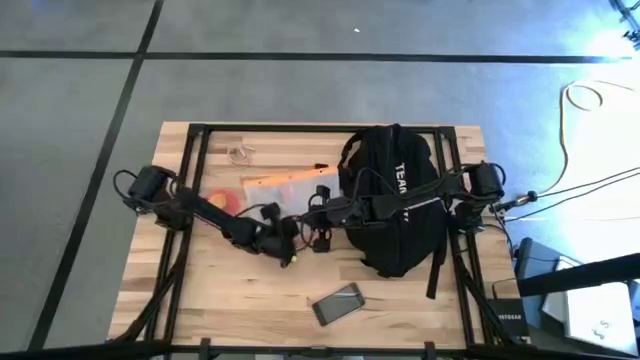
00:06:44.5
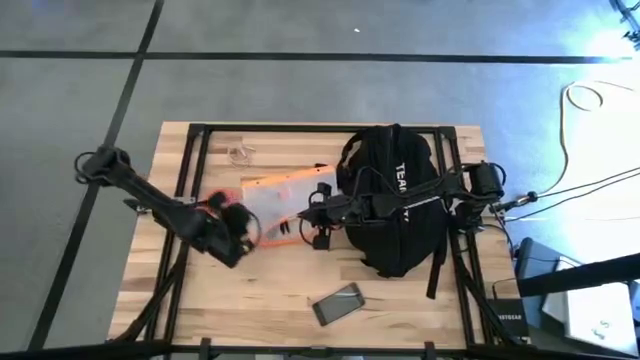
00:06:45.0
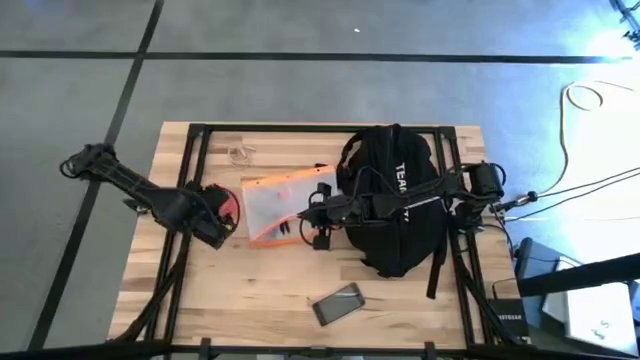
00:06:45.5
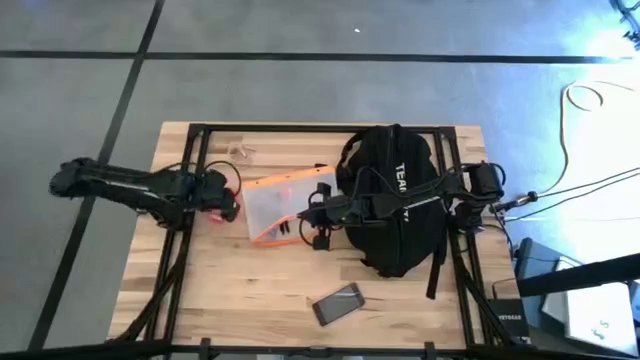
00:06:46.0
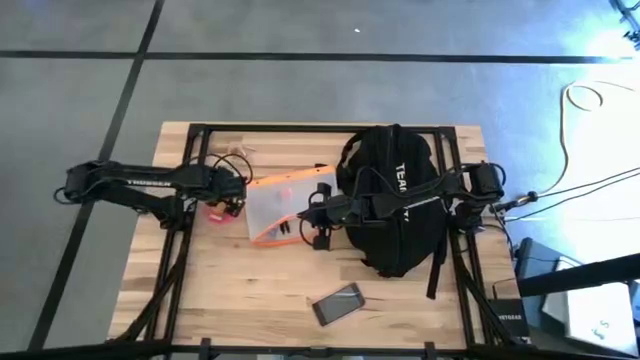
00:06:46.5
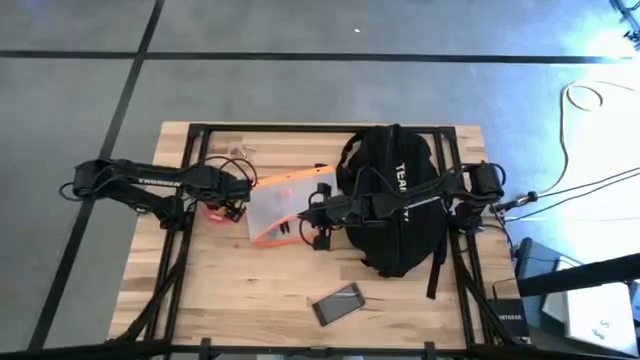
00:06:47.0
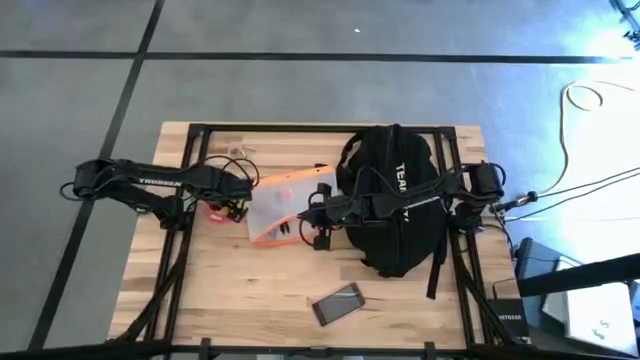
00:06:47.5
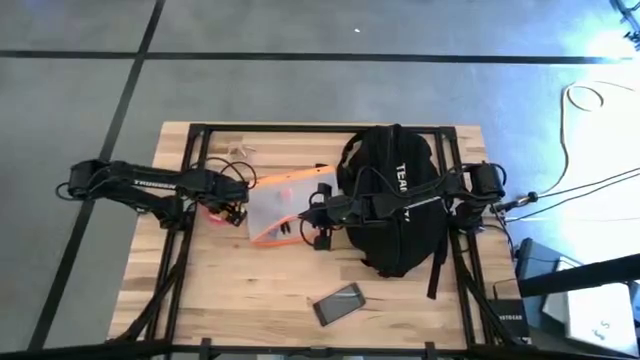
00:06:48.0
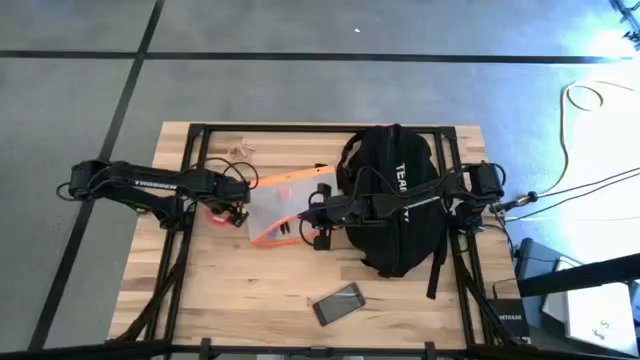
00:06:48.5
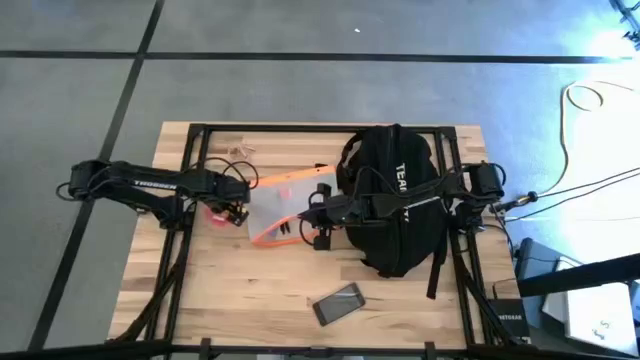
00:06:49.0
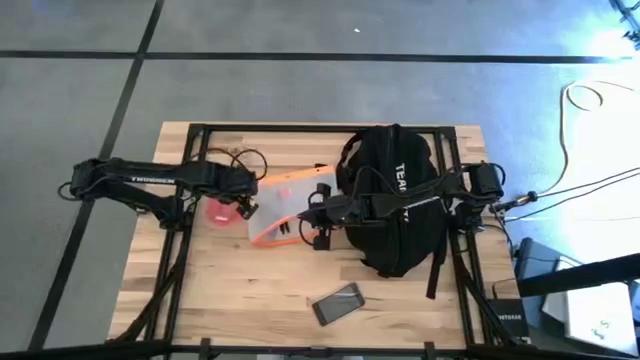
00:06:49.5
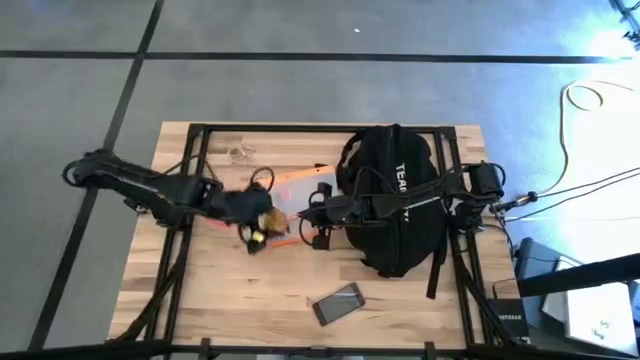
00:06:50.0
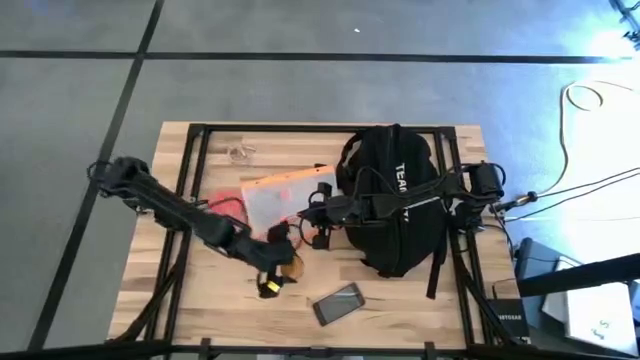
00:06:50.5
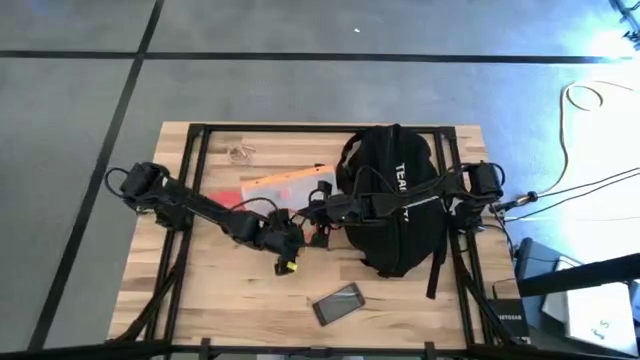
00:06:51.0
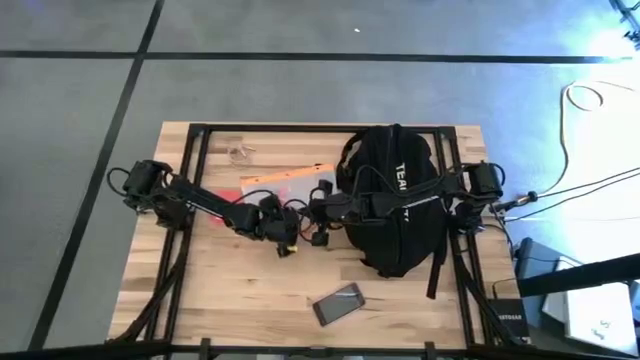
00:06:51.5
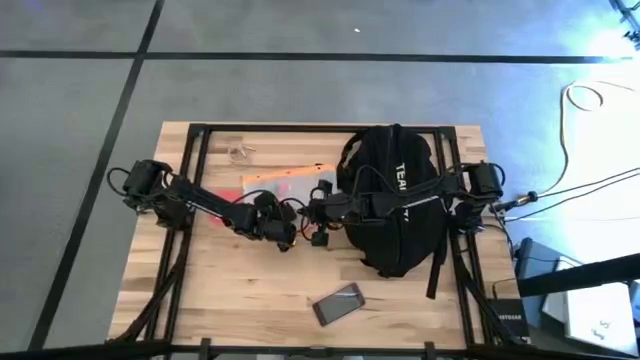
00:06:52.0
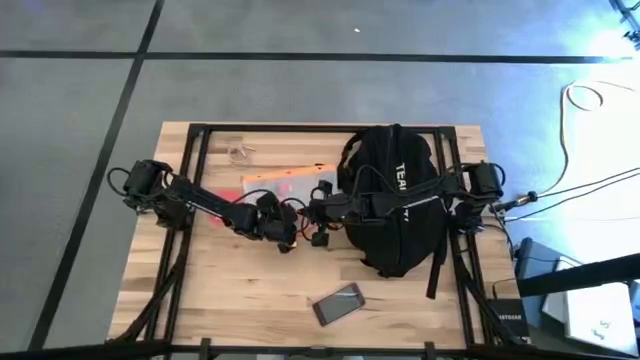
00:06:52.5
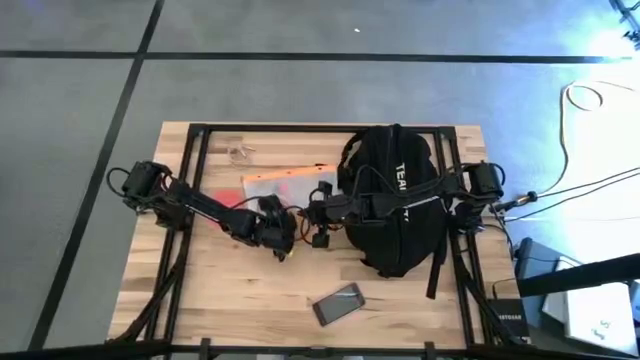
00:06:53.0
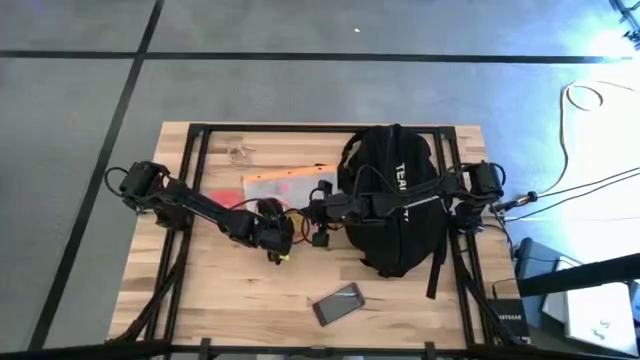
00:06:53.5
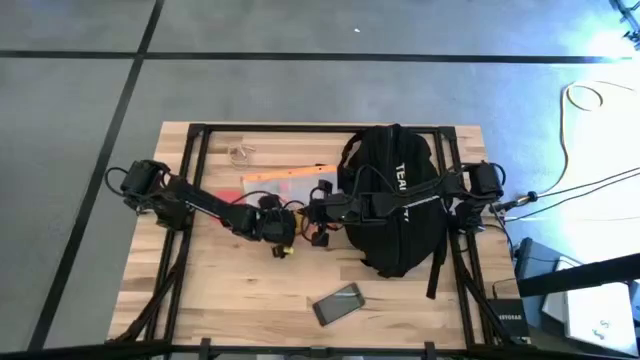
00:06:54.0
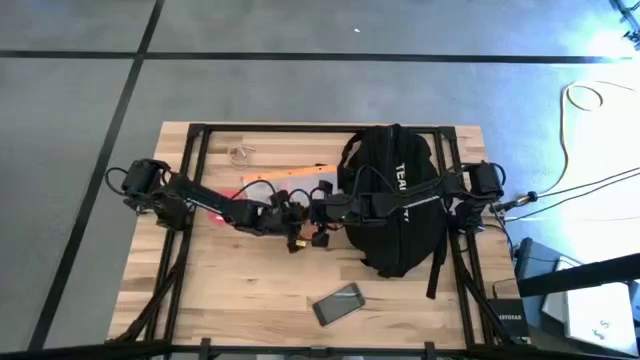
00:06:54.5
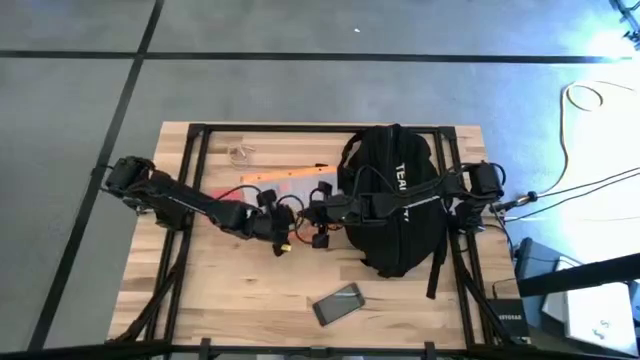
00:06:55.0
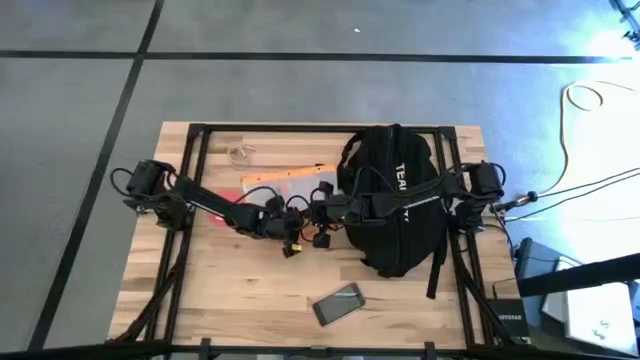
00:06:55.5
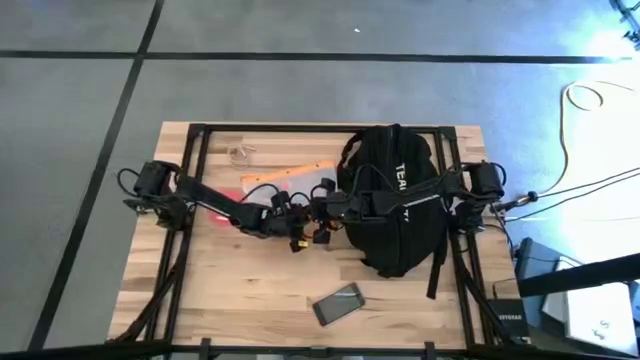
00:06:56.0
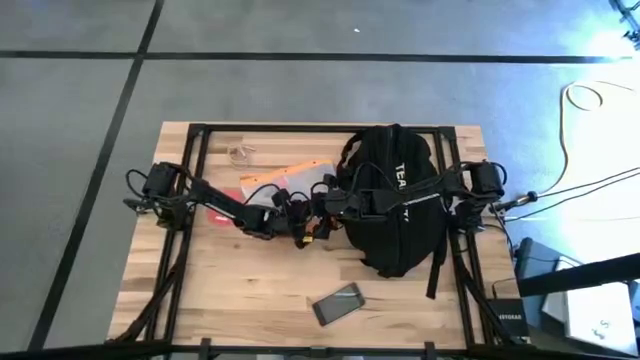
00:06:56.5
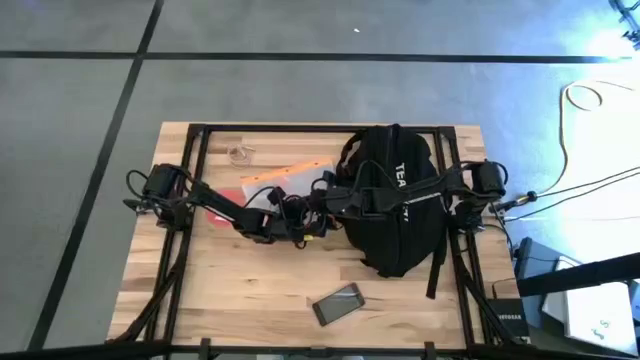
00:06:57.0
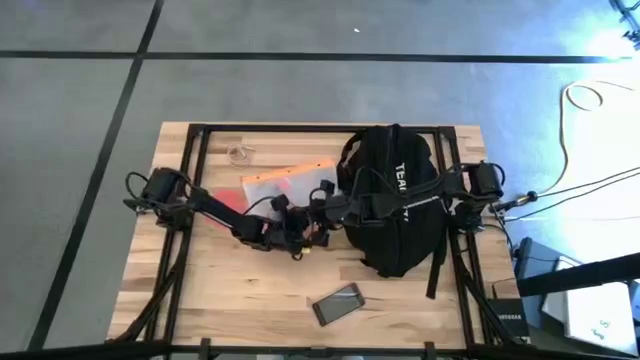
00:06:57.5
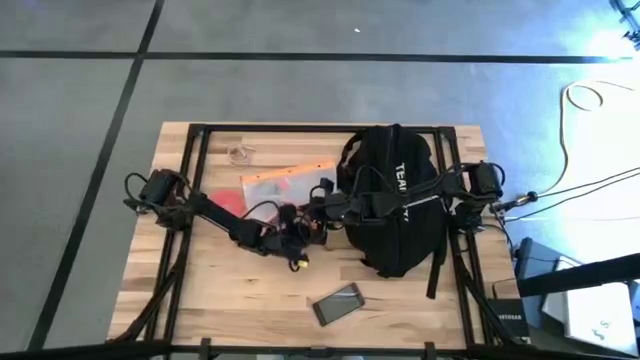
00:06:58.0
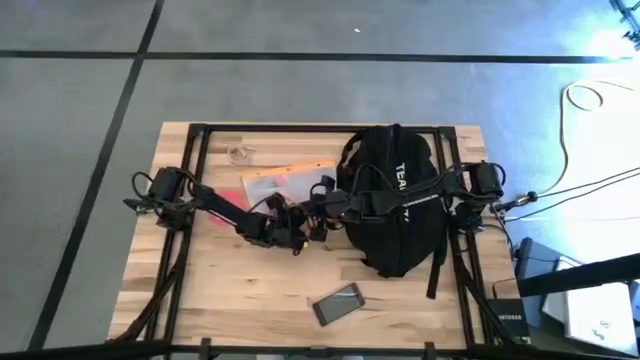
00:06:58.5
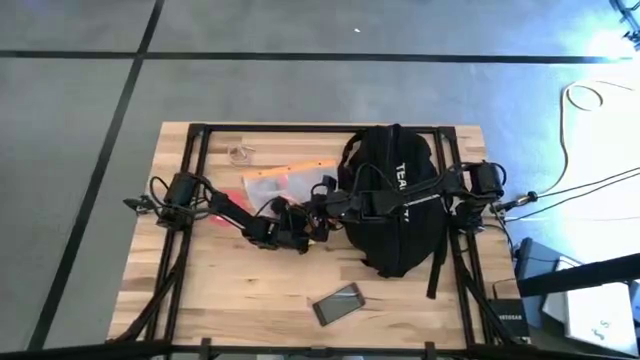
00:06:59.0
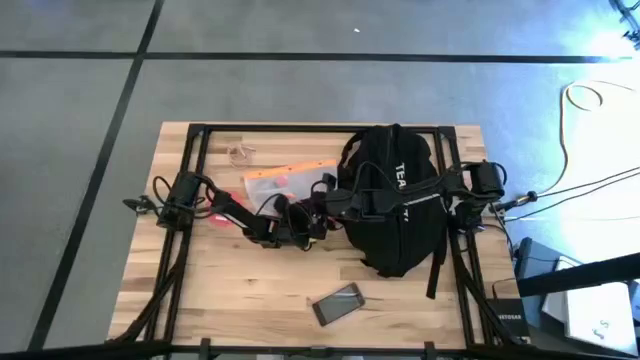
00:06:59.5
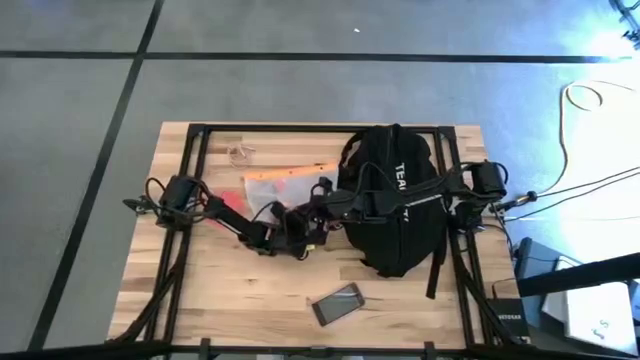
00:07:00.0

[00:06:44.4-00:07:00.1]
Task: Unpack backpack
Put the yellow scented candle into the transparent white zip bag

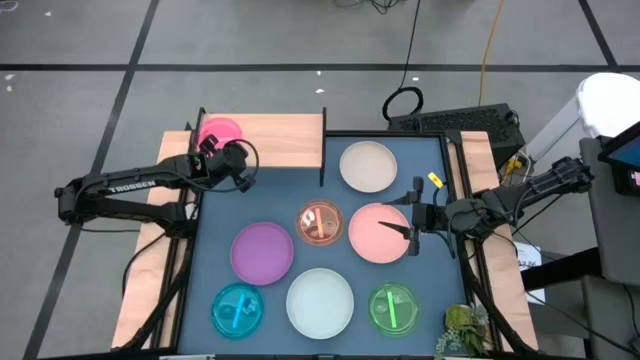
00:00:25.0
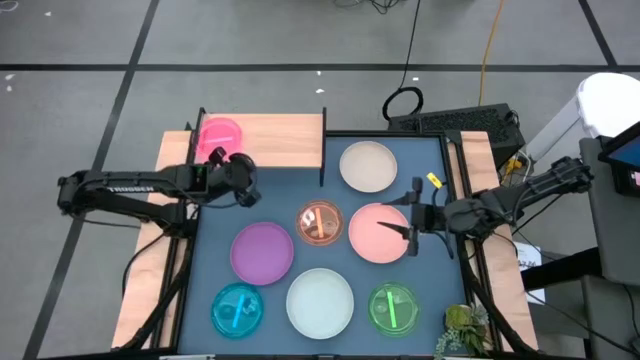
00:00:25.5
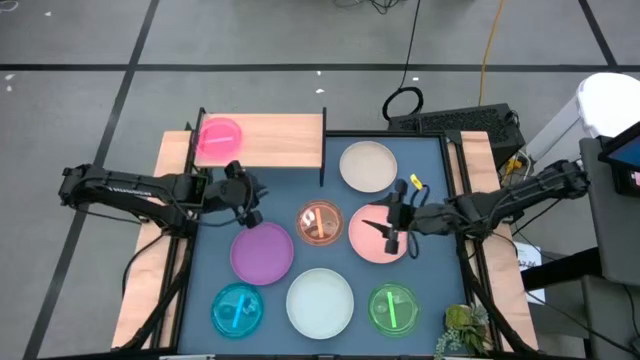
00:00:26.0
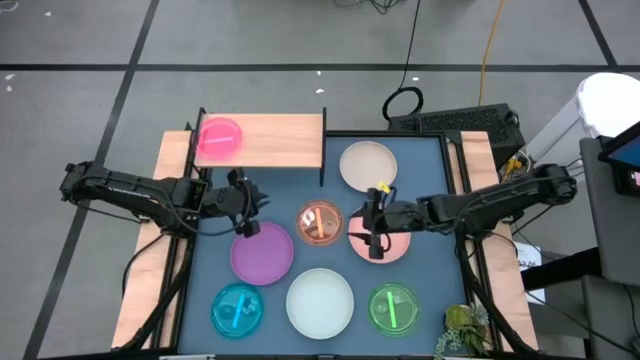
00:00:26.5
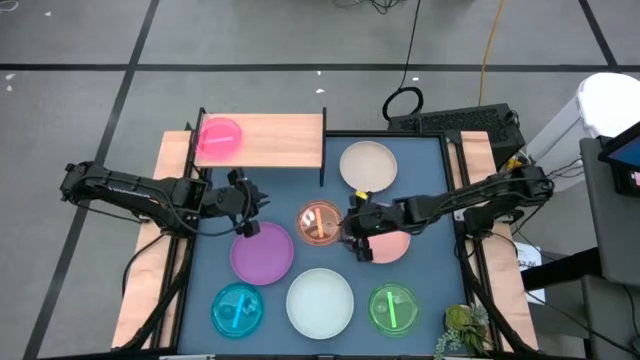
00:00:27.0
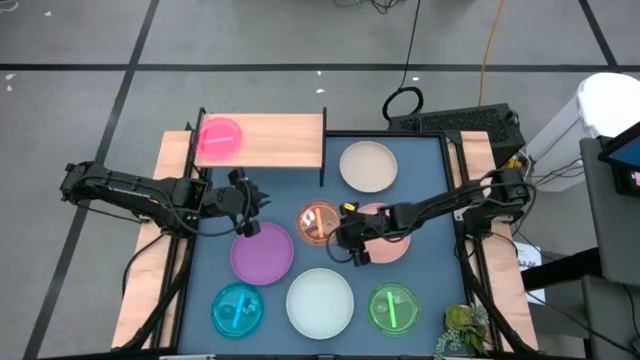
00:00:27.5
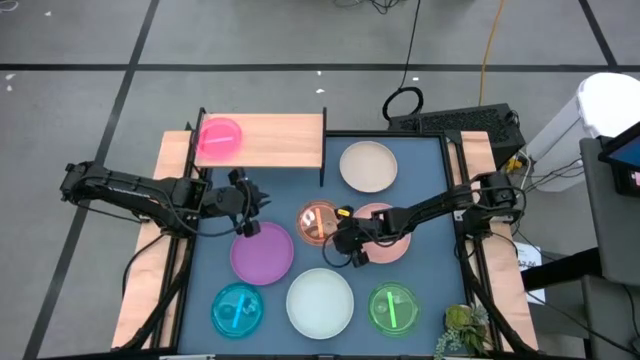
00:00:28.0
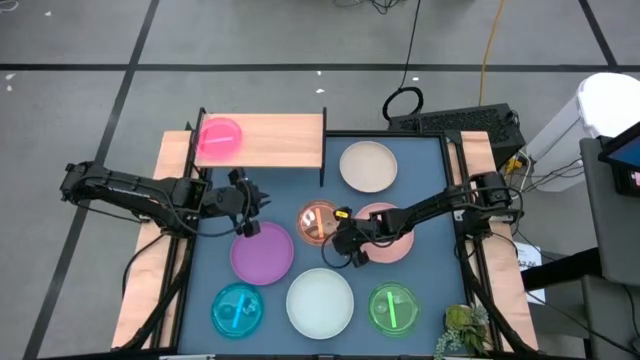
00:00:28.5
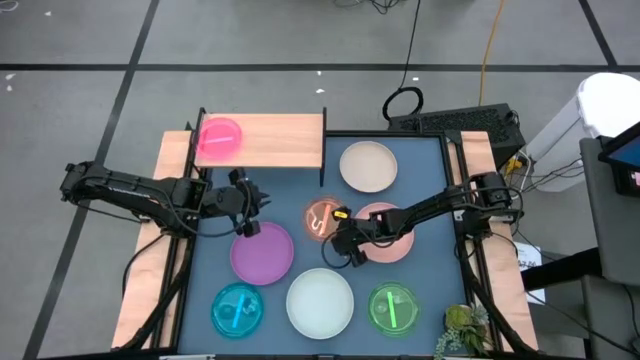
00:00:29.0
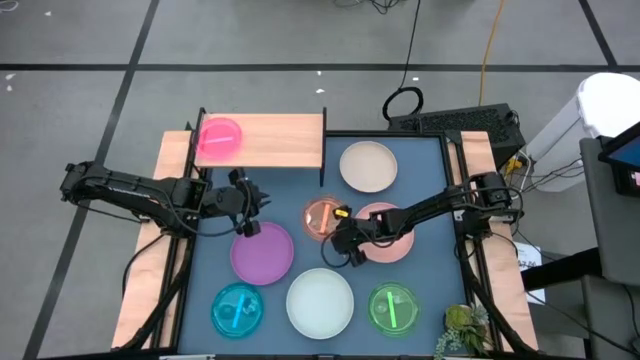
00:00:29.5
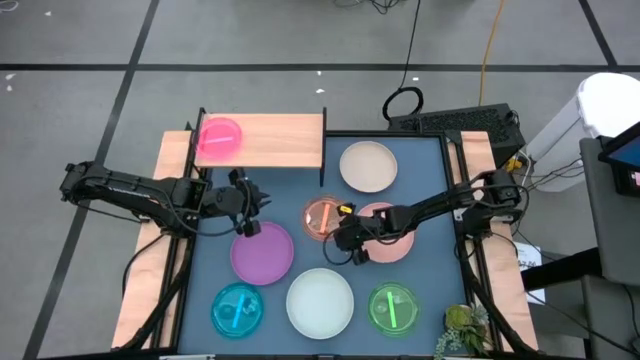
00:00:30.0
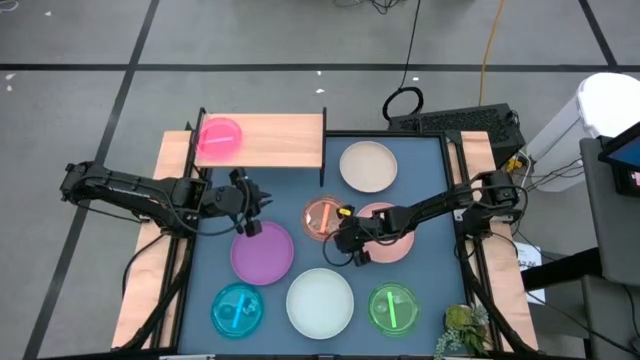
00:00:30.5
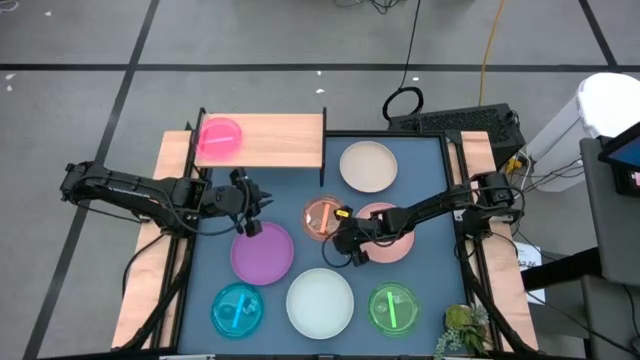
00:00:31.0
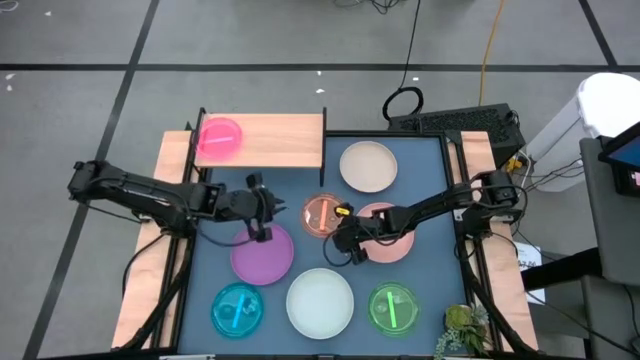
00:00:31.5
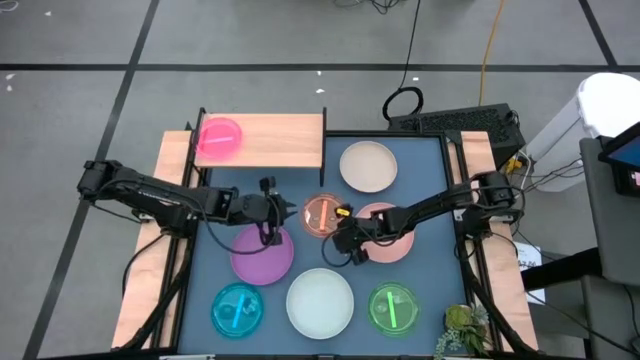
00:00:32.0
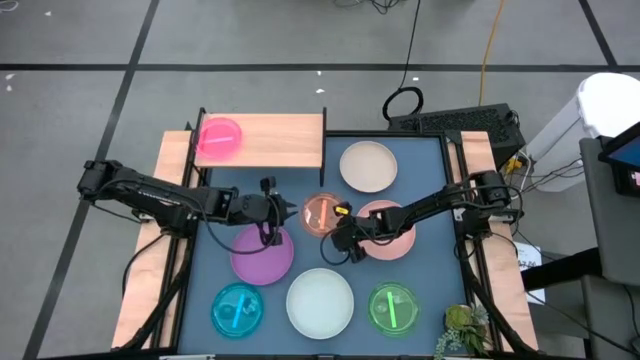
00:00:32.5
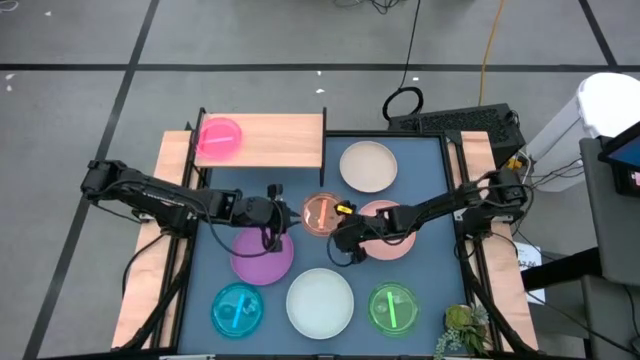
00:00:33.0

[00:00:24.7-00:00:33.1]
Task: Place and stack plates onto a shelf
Stack the orange plate on top of the light pink plate on the shelf
